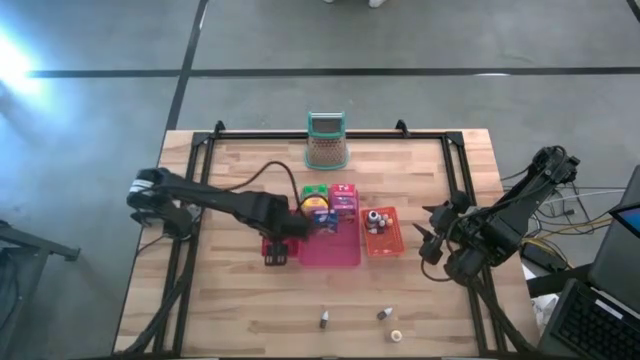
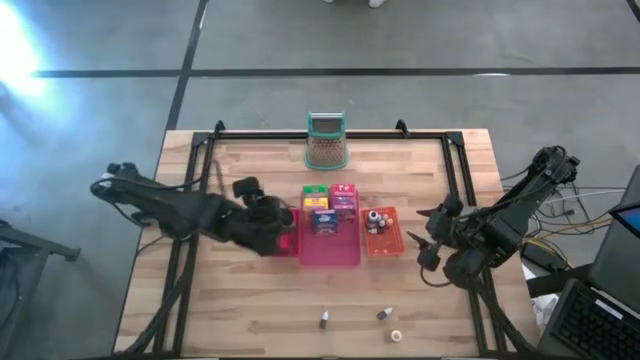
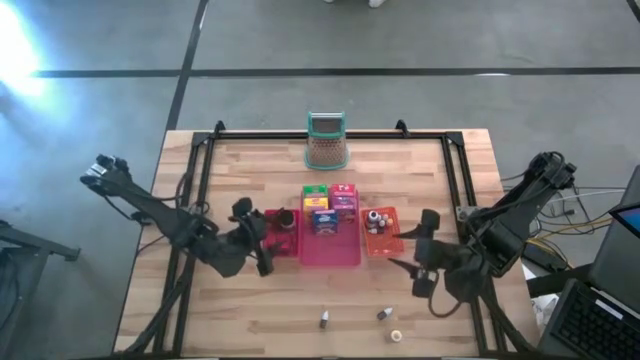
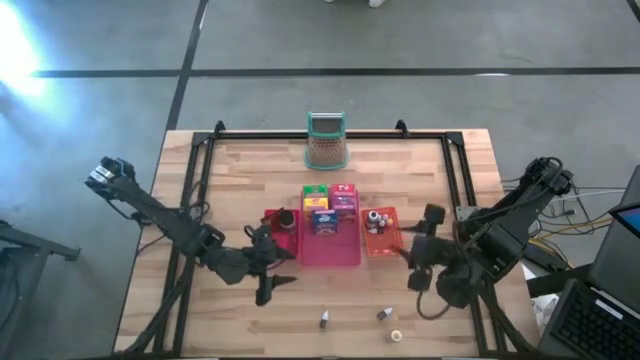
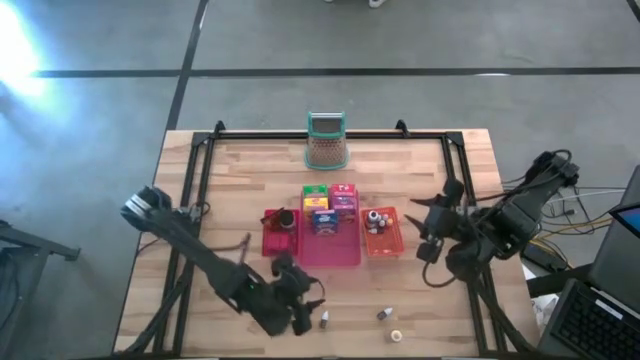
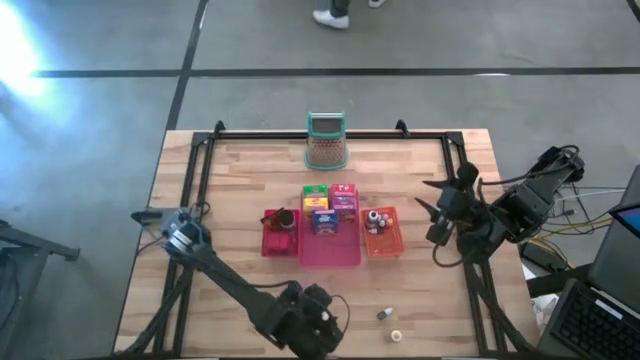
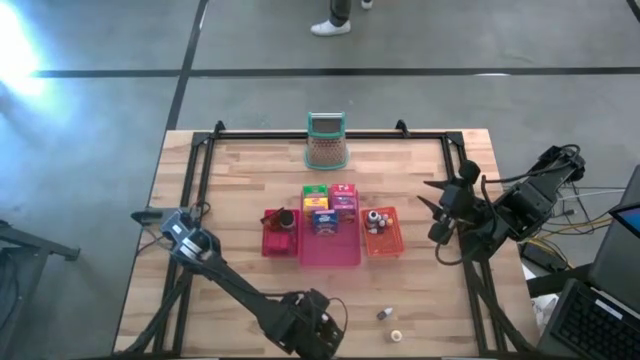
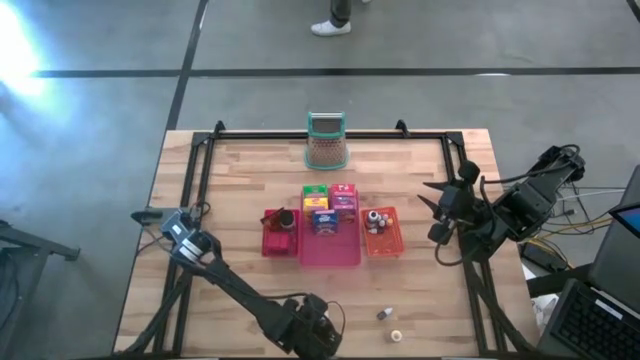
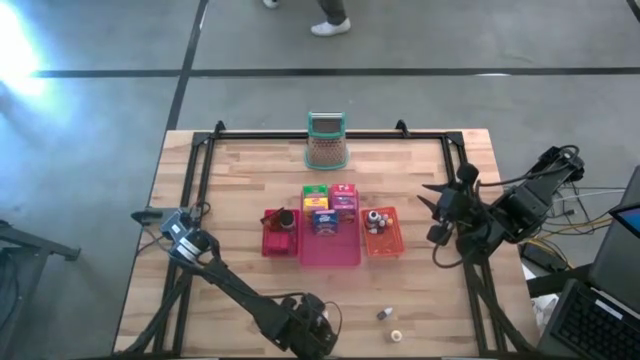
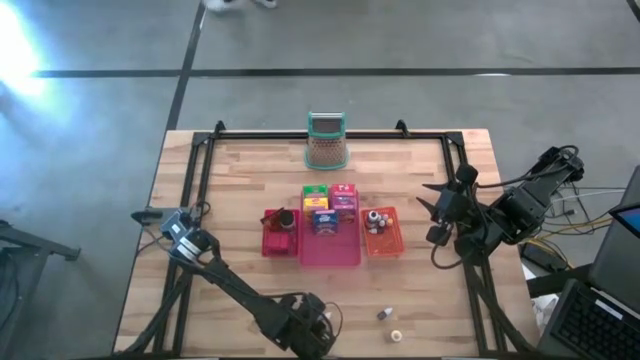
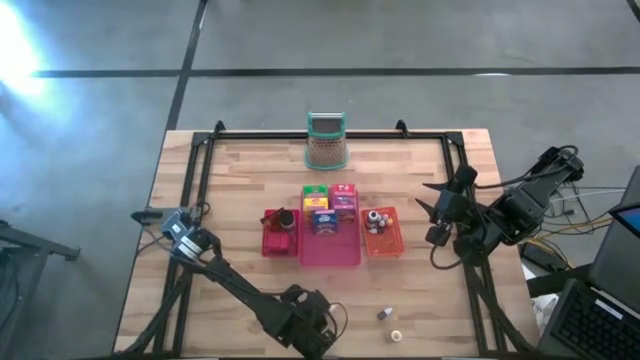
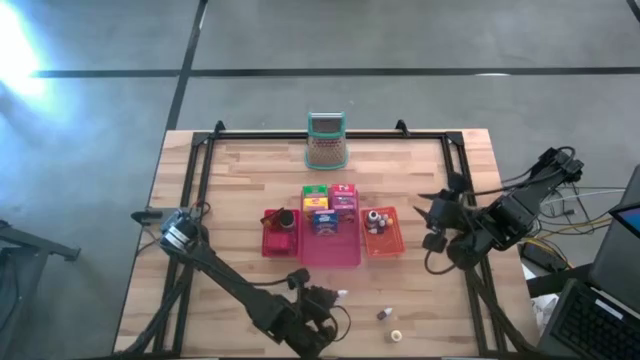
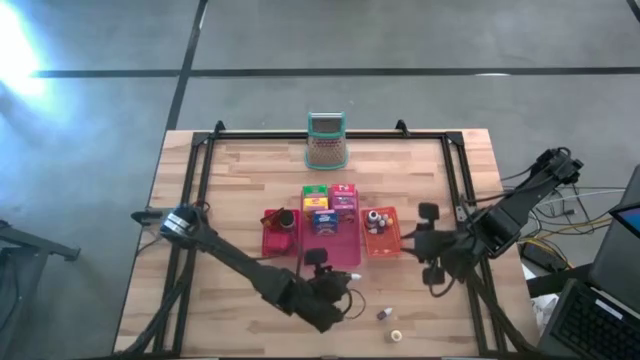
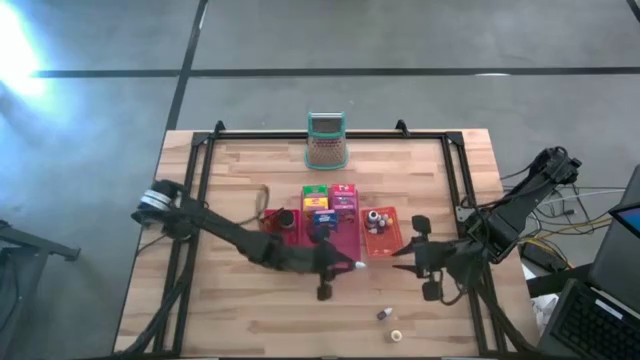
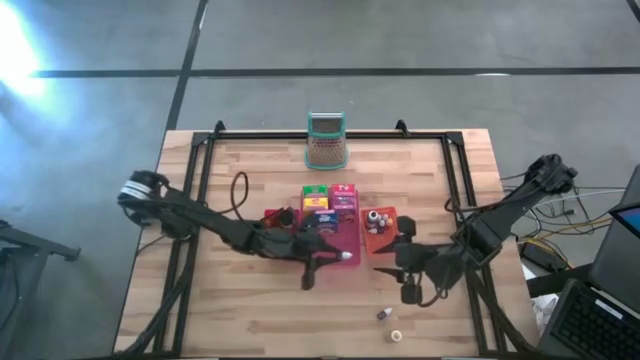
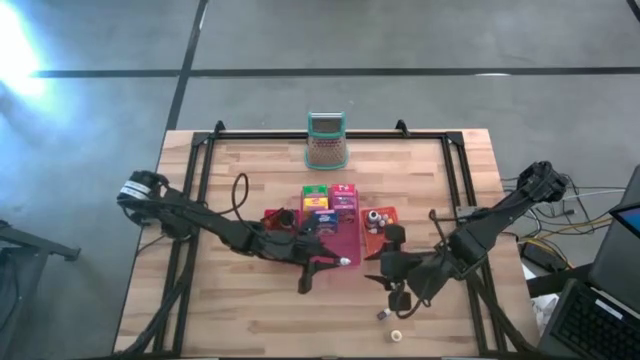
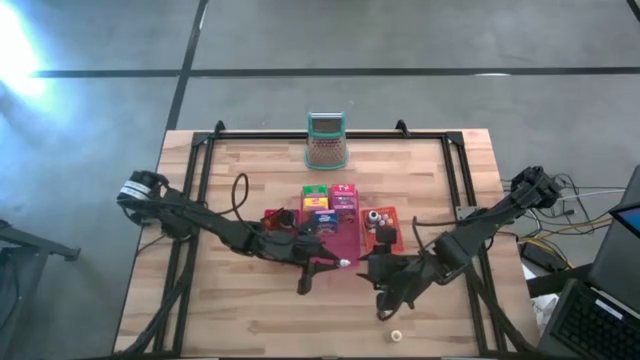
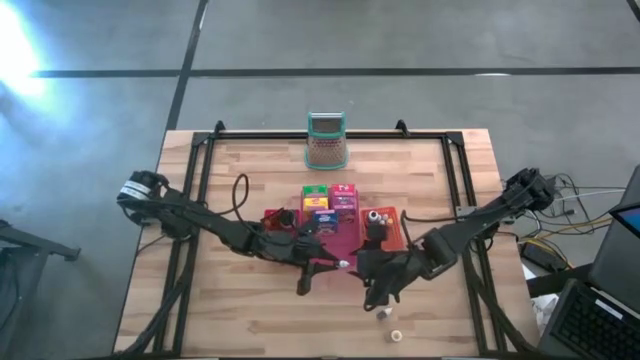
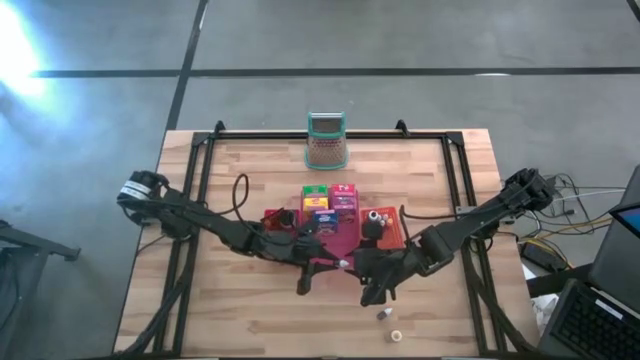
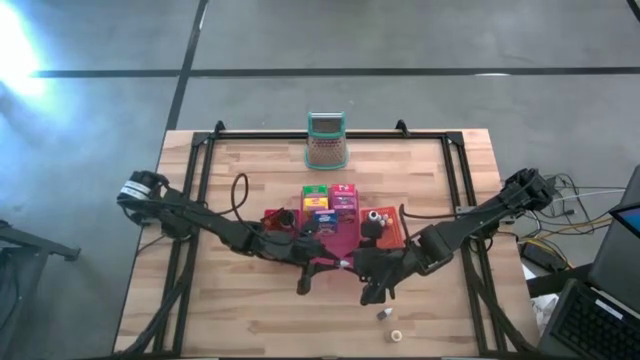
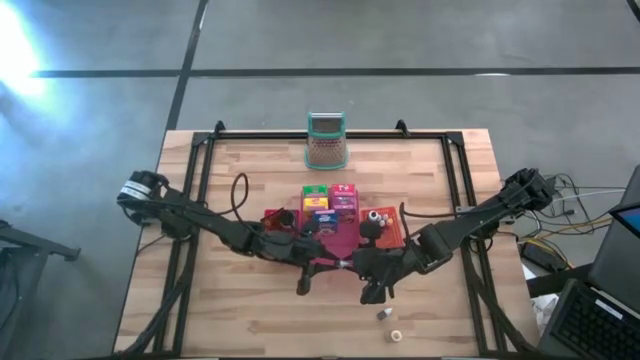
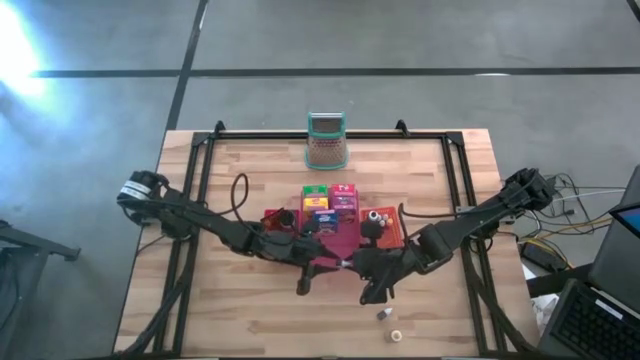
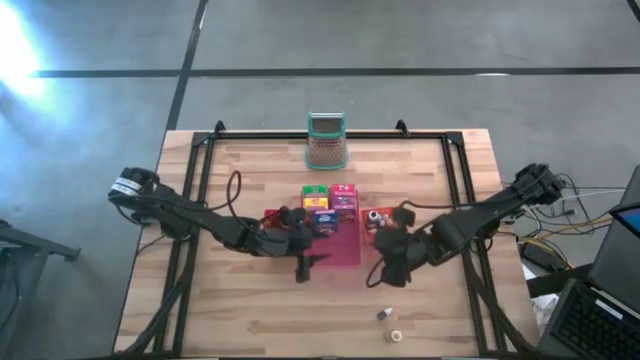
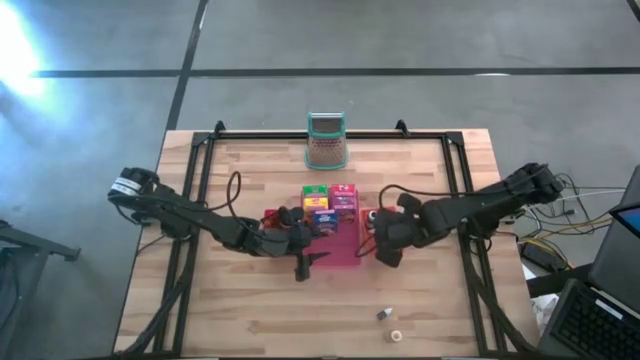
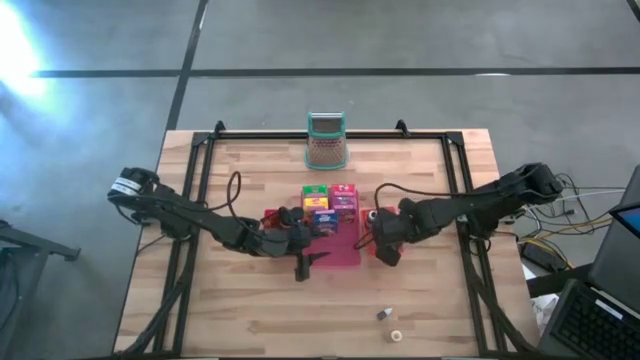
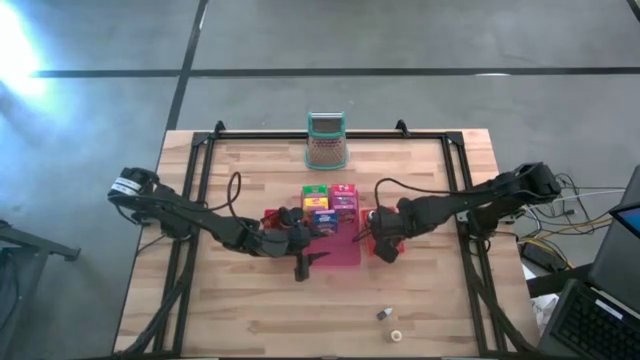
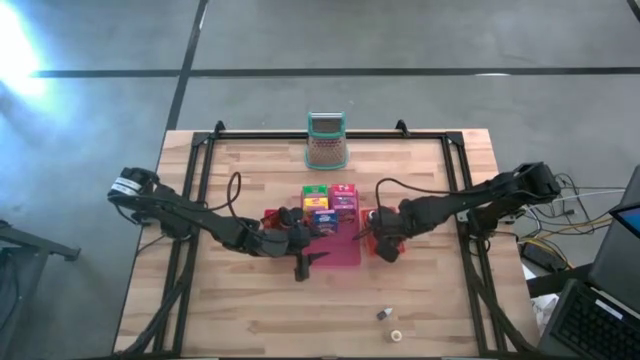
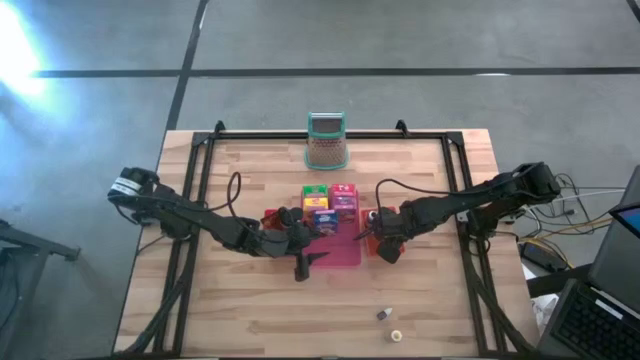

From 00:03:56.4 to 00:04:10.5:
Task: Pick & Place Kitchen Items
Put the small brown food coloring bottle into the orange bin

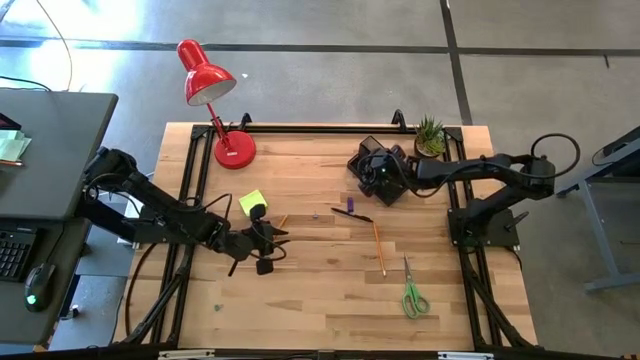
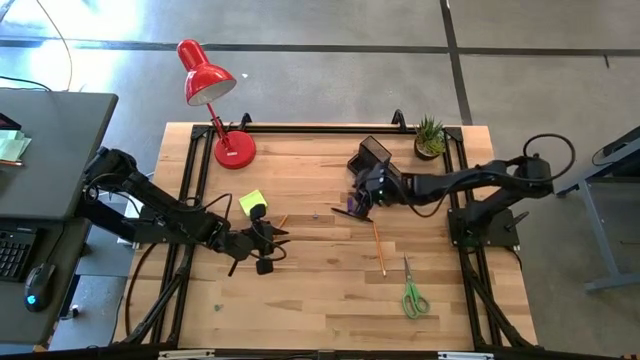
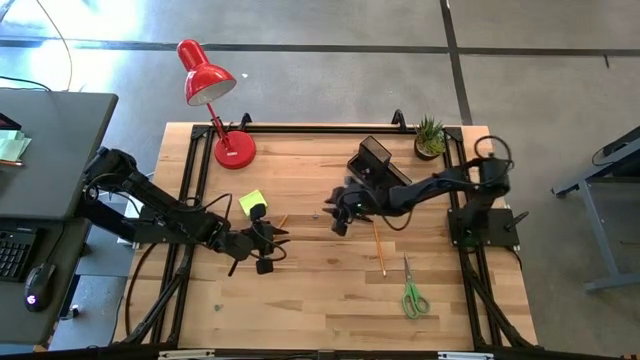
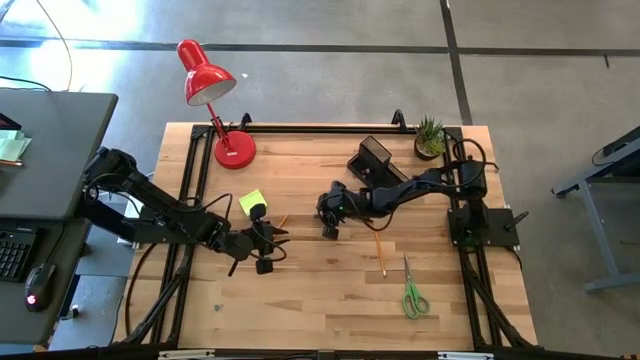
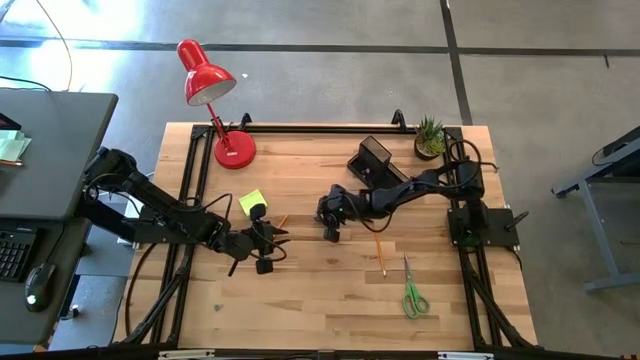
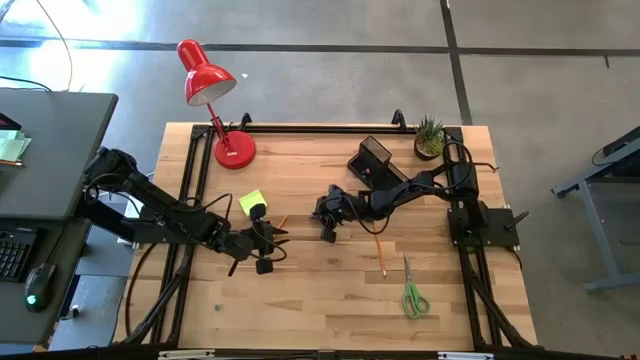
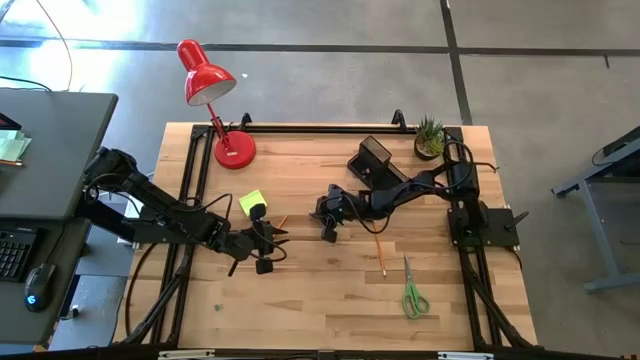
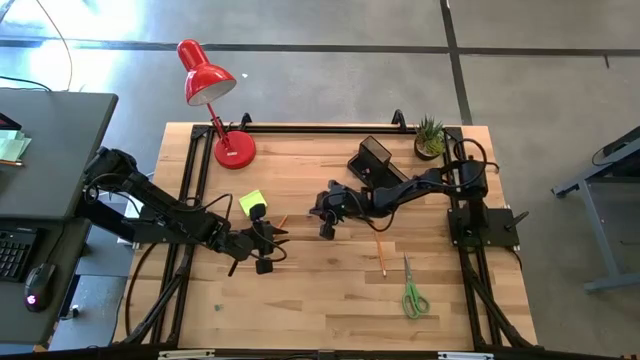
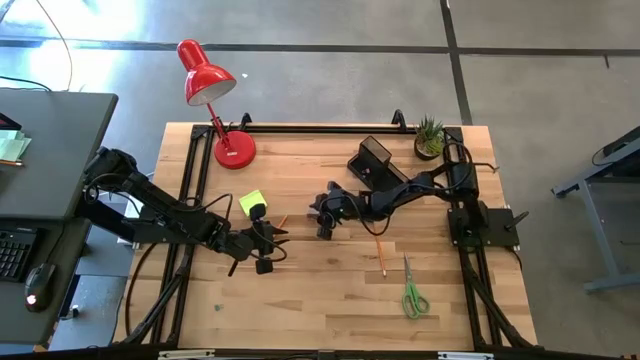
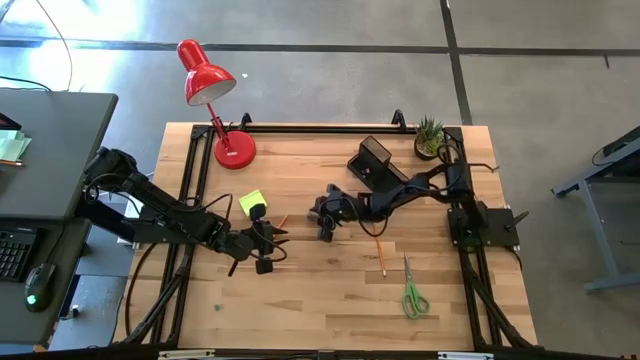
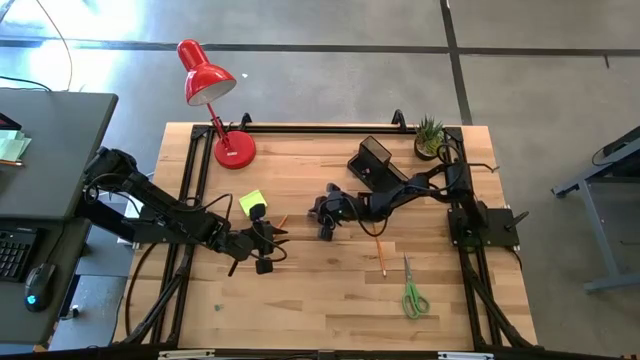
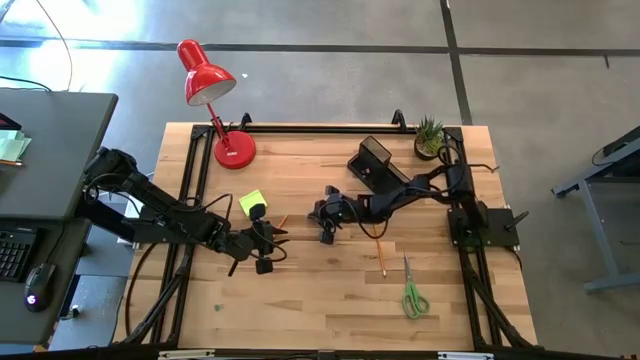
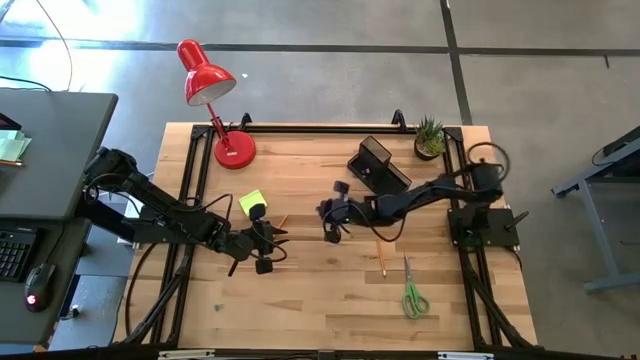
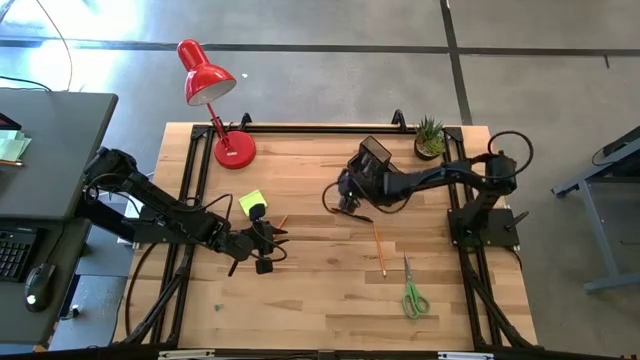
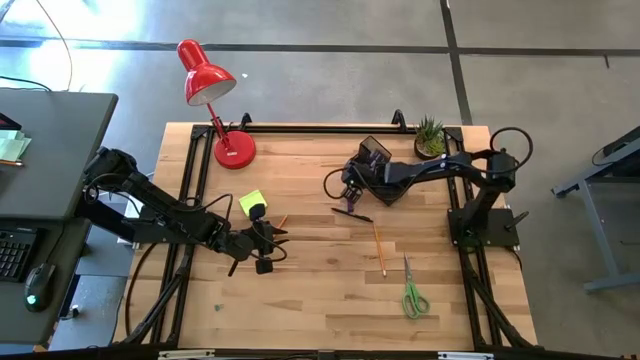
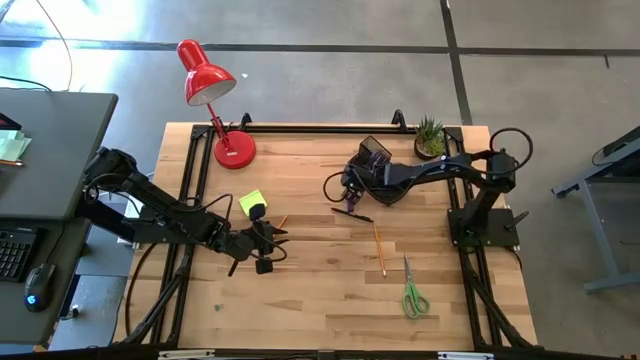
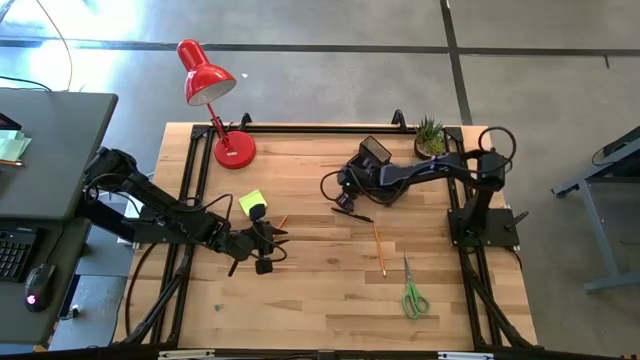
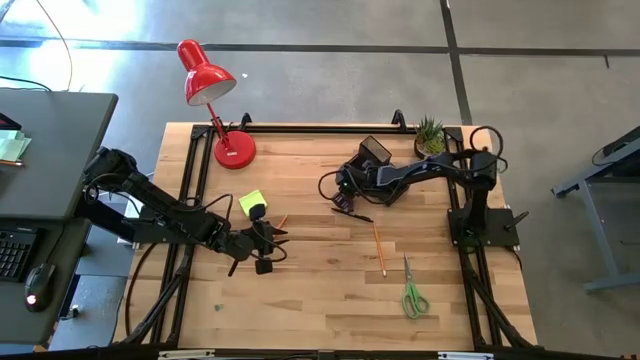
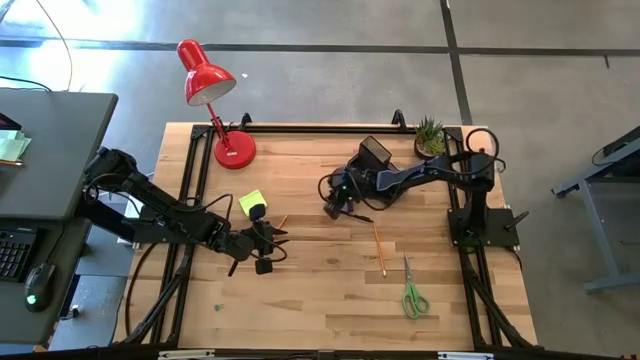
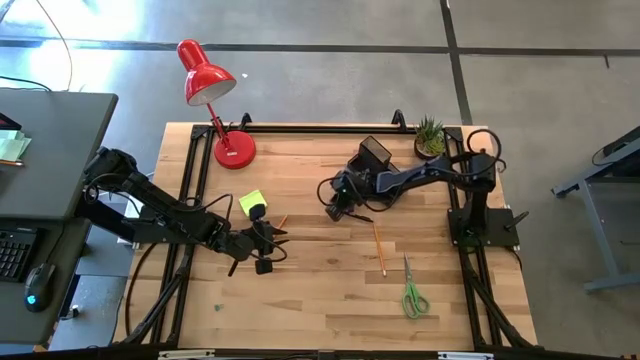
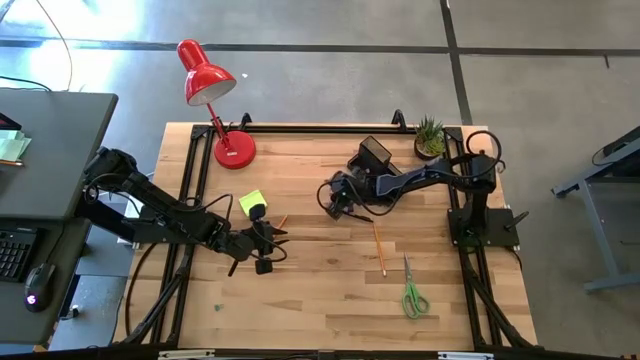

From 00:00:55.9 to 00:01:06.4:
Task: Pick and place office supplies into organizer
Put the right blue binder clip into the black desk organizer
